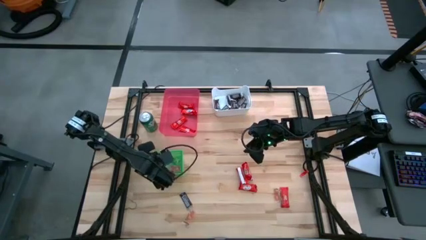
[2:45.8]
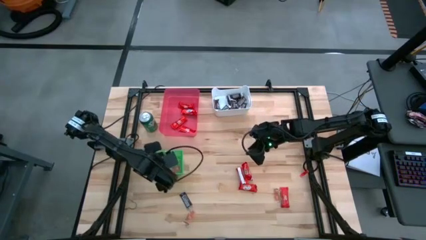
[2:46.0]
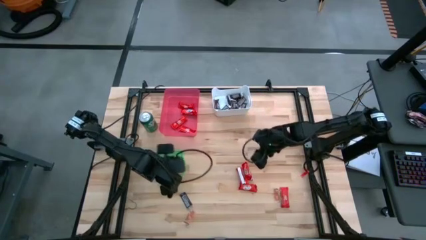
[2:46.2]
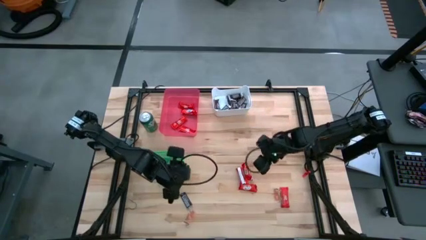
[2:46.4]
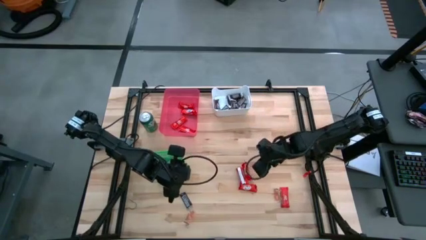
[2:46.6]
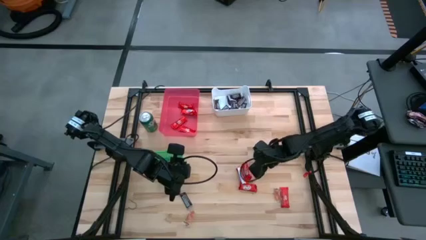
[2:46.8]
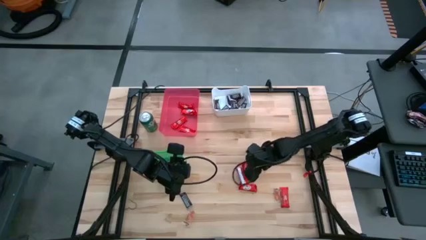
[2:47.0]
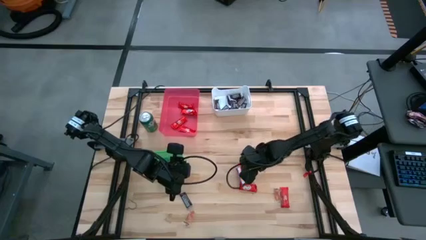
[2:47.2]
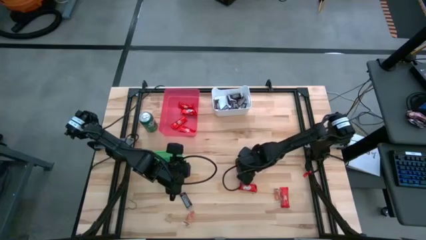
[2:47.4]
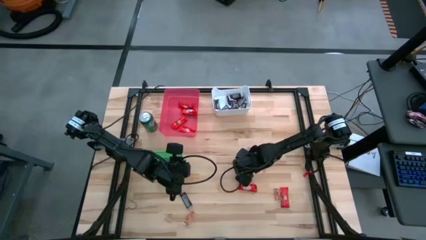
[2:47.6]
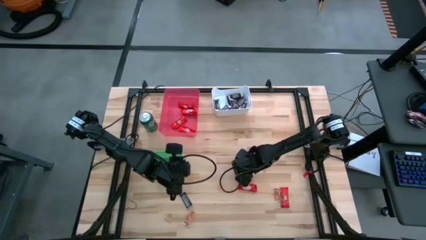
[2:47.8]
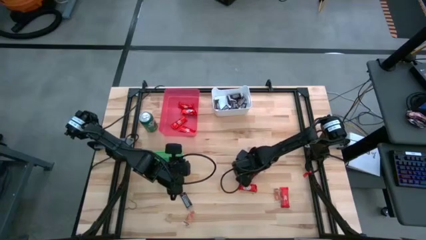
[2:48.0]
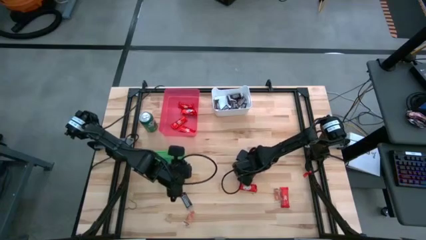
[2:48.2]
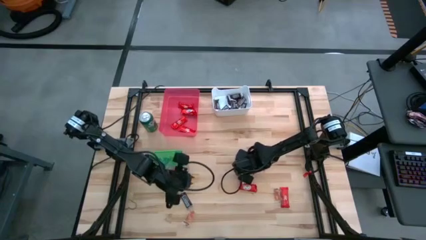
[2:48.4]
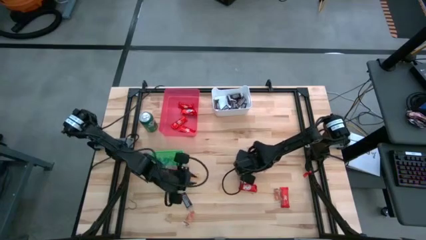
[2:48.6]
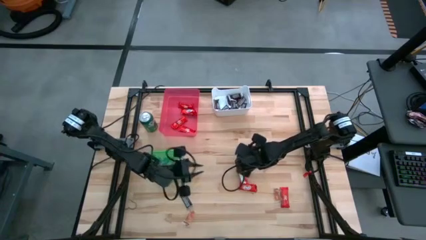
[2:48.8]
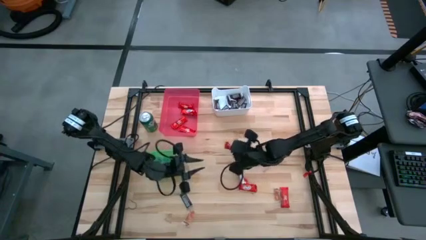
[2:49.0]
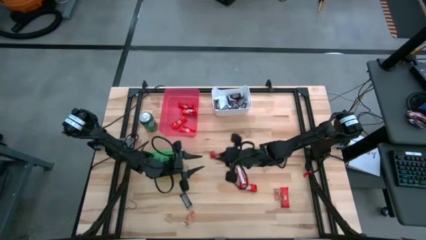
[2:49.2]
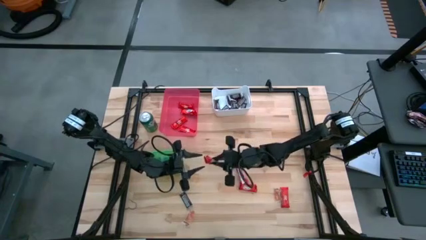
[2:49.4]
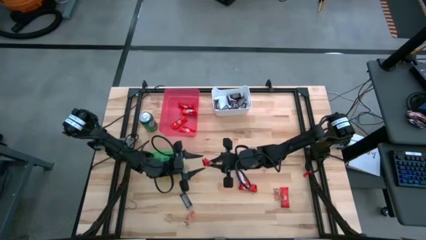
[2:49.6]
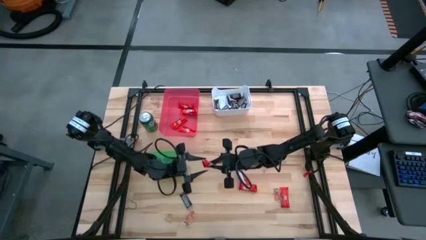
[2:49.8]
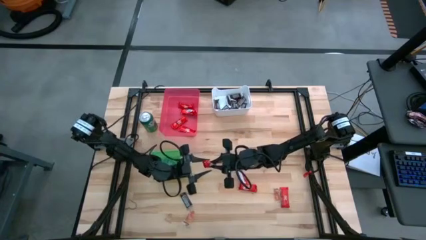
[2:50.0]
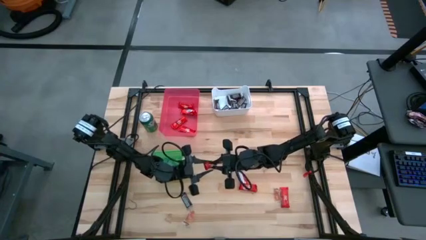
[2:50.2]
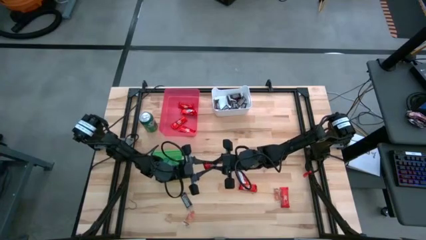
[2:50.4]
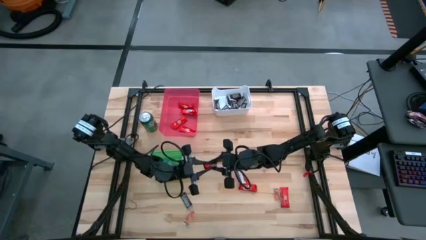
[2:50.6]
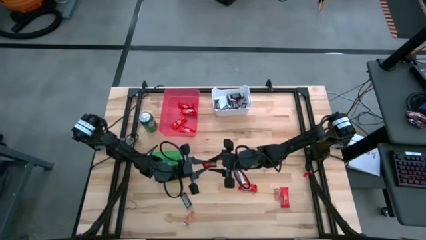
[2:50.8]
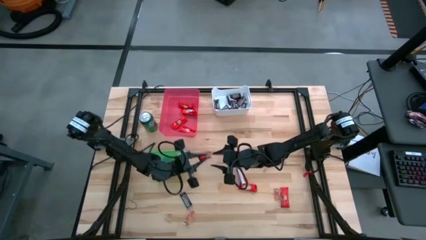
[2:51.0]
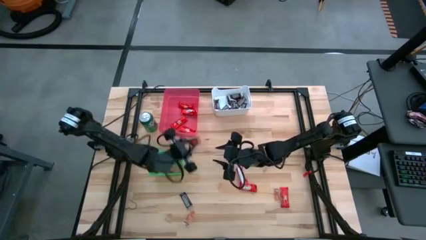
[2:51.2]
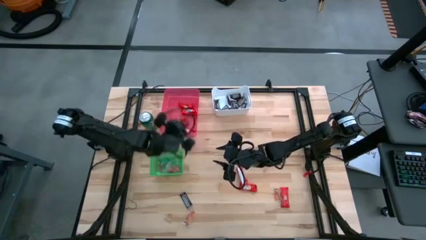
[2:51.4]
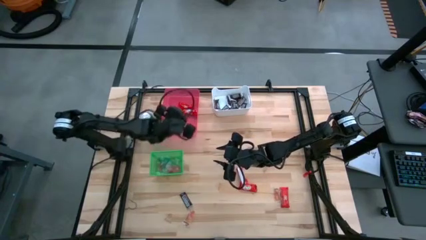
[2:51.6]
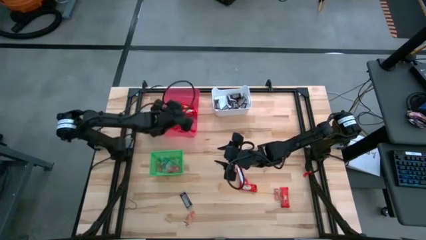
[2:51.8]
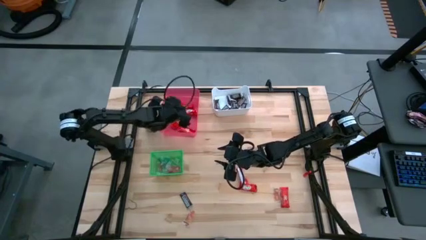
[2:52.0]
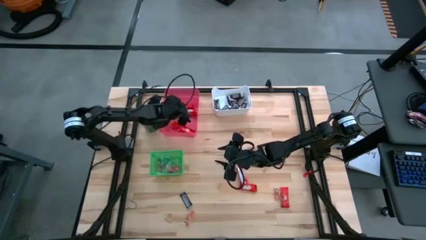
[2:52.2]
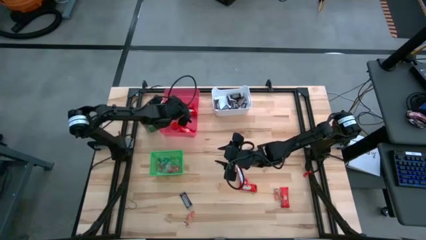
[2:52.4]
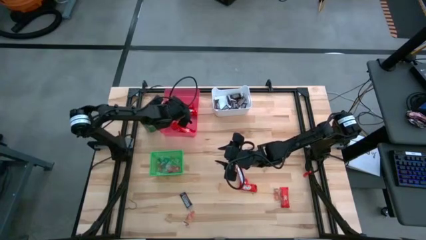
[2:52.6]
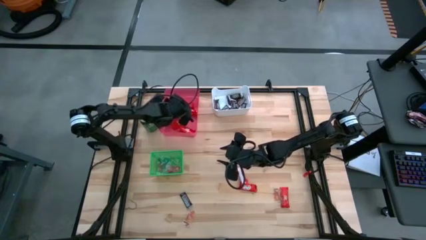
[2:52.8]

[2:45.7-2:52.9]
Task: Organize candy in baskets
Put the red chocolate into the pink bin

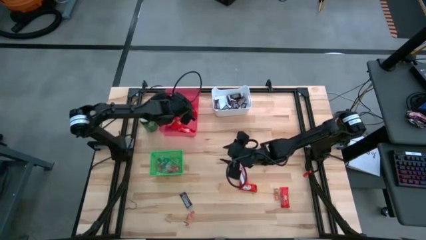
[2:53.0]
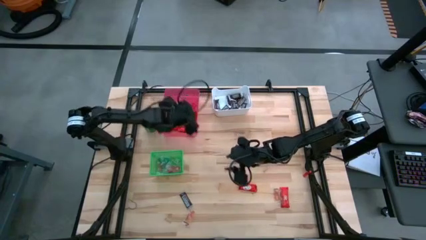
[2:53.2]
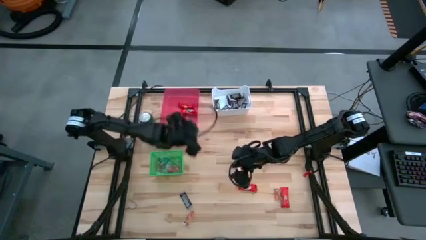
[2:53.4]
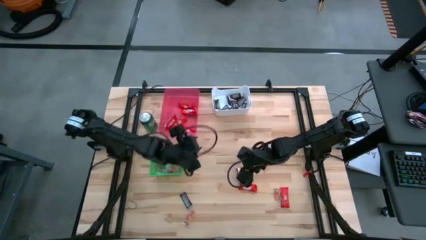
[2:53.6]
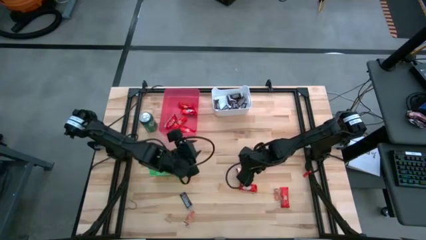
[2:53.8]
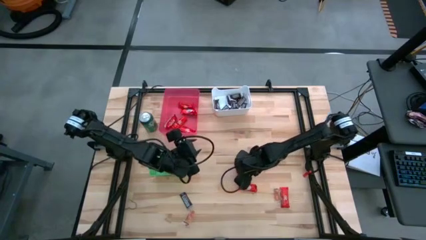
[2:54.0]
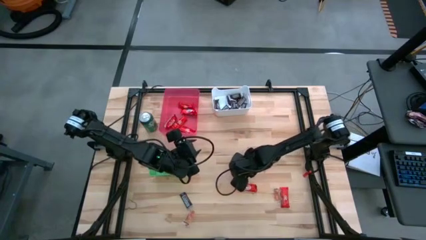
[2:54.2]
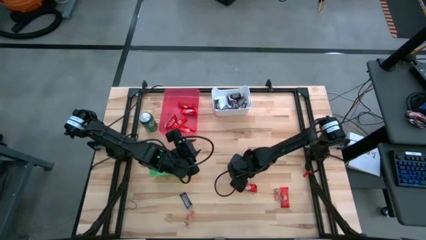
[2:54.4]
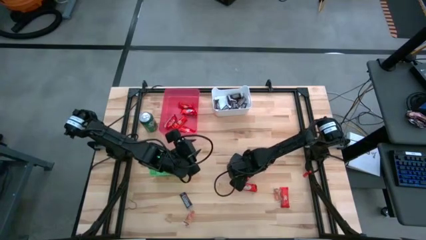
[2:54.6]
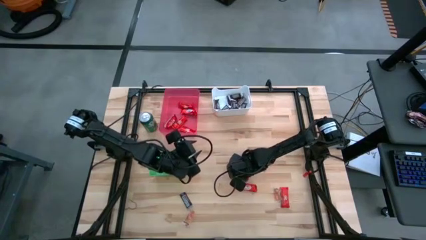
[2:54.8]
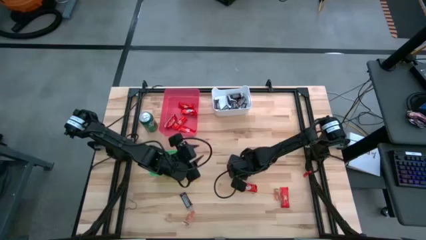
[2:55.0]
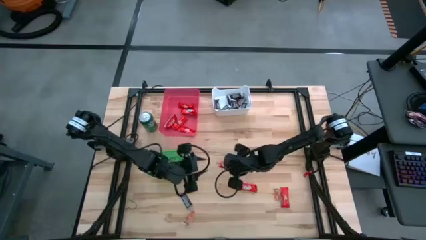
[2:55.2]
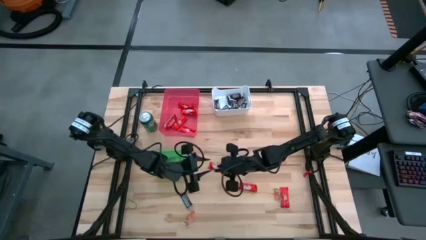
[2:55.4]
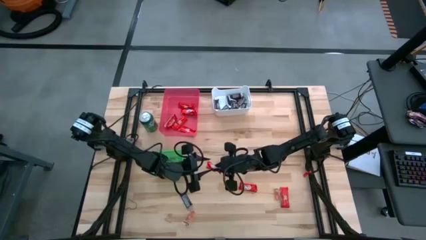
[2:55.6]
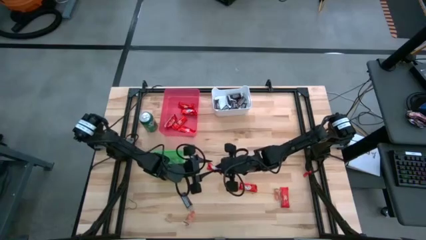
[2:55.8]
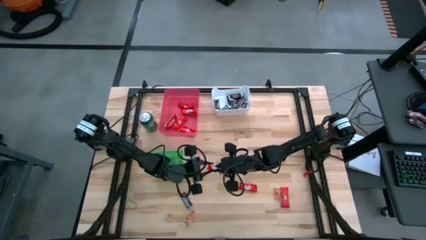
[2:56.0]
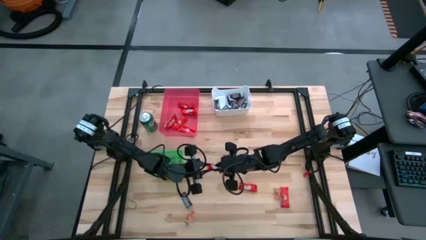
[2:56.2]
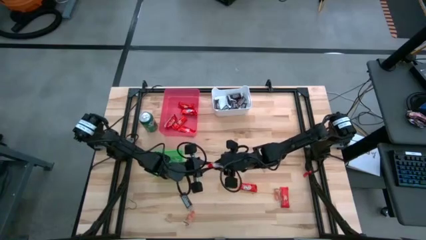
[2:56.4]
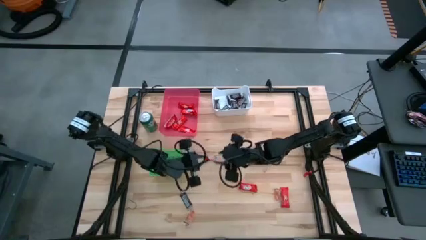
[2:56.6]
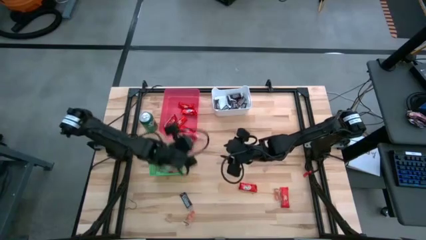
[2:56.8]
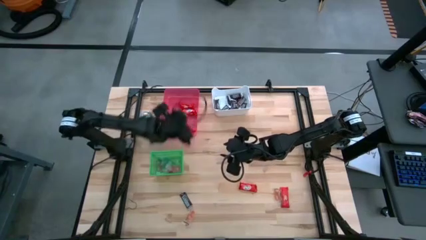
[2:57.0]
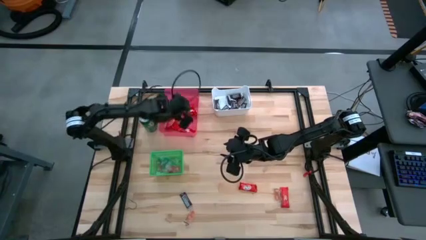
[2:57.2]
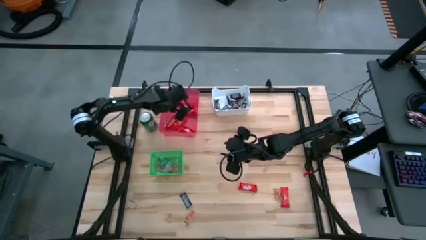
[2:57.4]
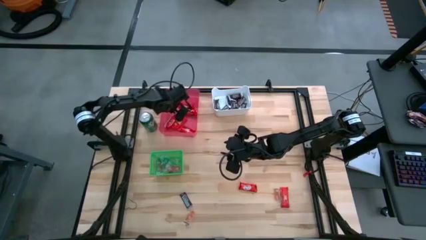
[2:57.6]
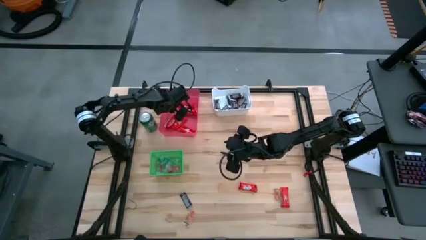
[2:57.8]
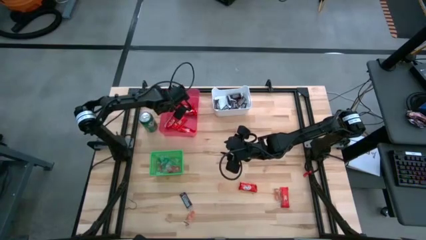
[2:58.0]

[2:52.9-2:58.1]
Put the red chocolate into the pink bin

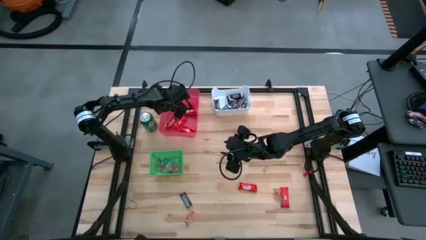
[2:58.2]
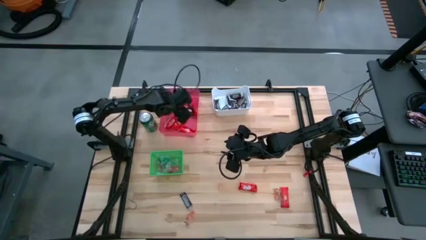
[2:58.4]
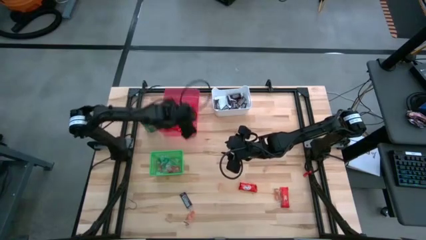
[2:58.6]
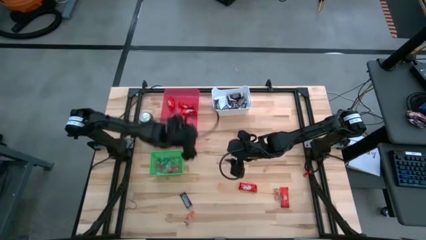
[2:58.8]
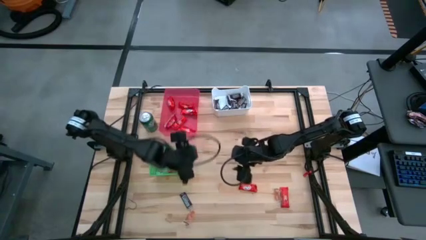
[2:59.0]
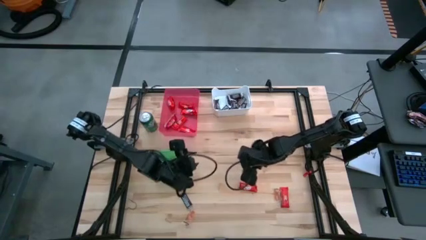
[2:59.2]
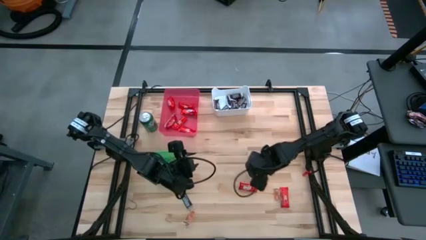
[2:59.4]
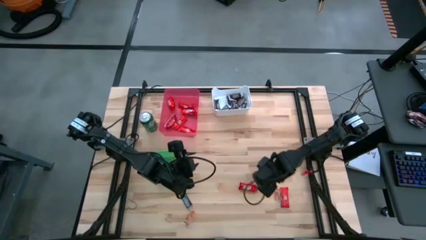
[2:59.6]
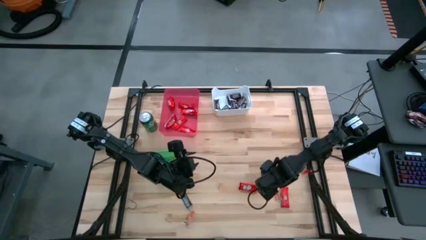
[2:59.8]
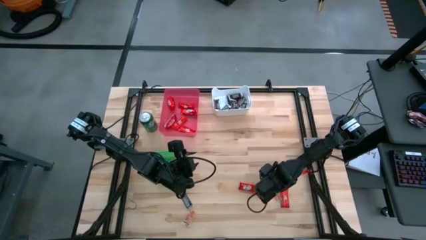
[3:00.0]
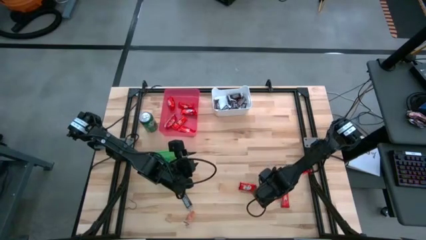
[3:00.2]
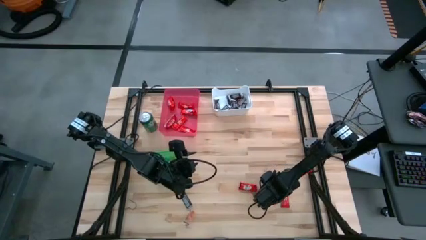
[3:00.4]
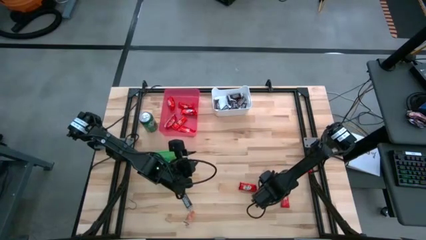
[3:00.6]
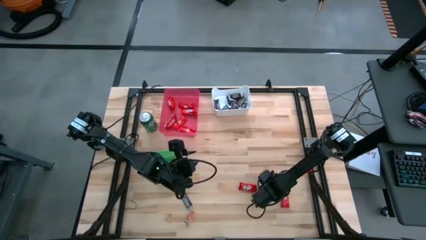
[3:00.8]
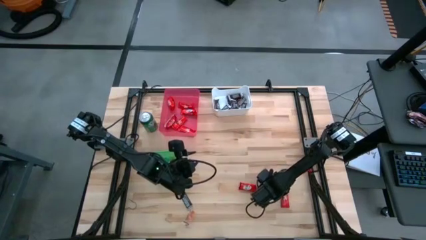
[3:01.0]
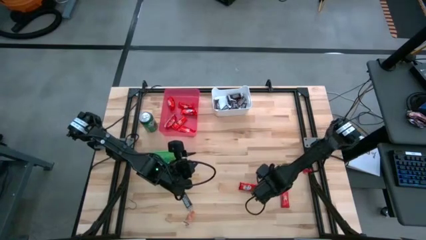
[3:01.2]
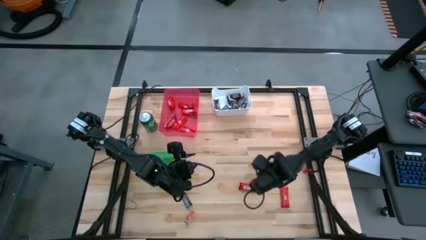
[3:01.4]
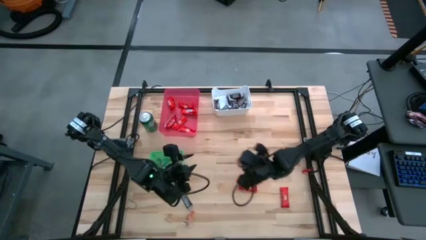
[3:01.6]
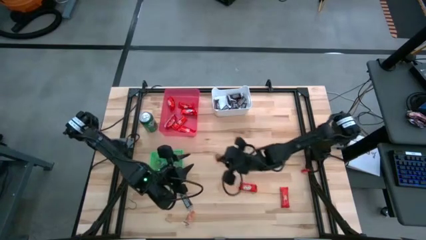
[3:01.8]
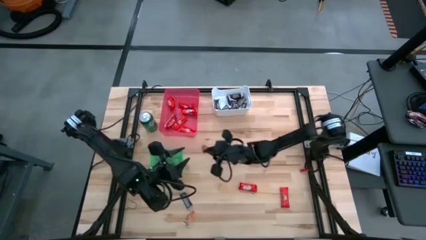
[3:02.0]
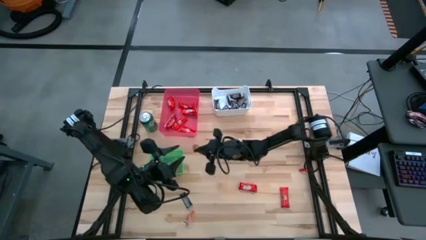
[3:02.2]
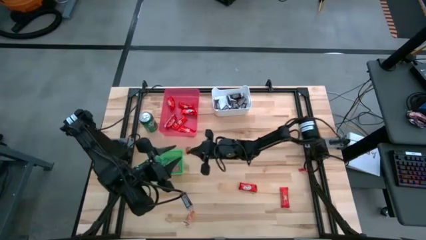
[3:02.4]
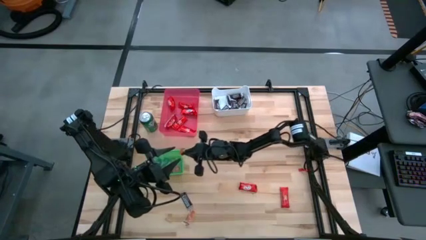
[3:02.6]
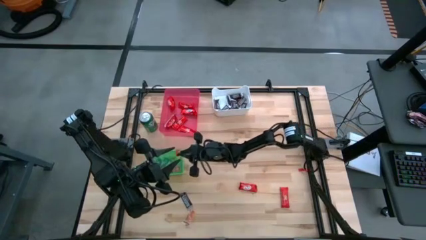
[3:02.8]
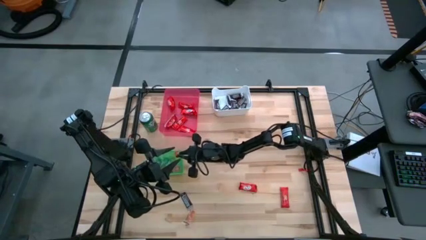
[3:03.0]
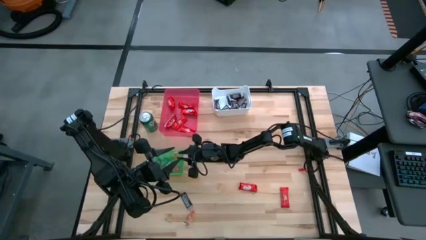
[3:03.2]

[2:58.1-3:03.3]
Put the orange gummy into the green bin
